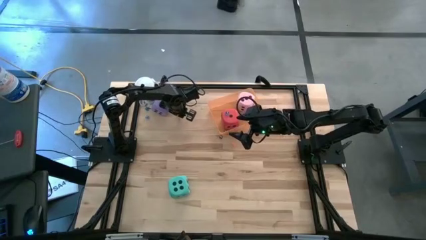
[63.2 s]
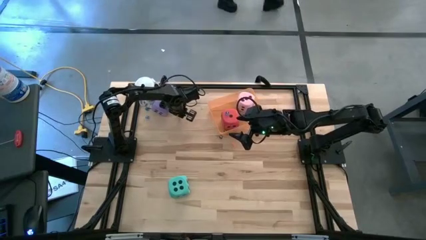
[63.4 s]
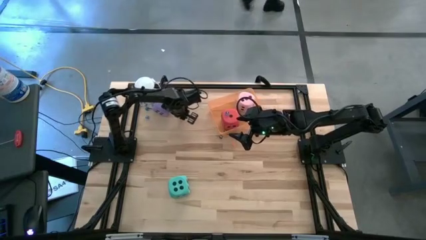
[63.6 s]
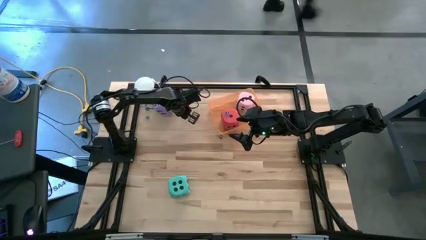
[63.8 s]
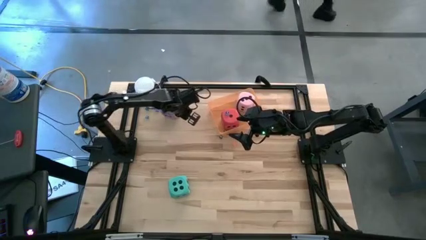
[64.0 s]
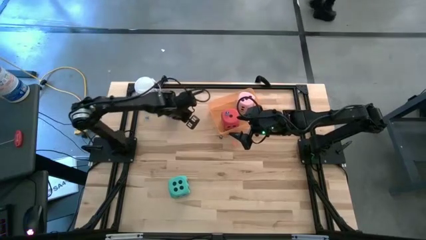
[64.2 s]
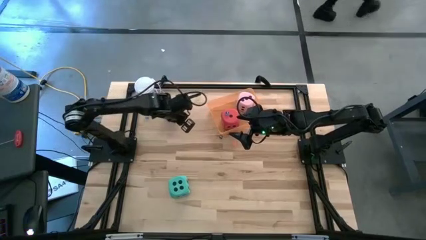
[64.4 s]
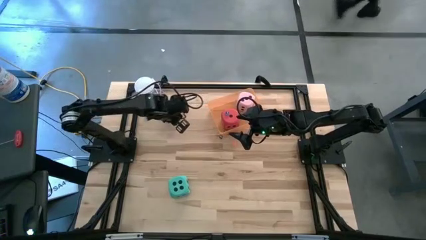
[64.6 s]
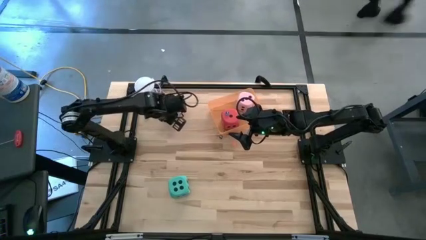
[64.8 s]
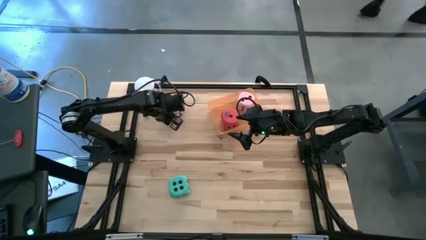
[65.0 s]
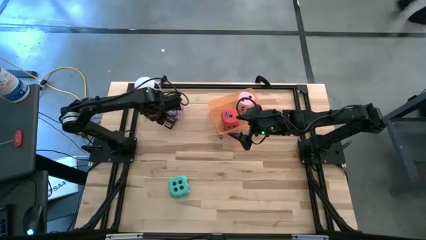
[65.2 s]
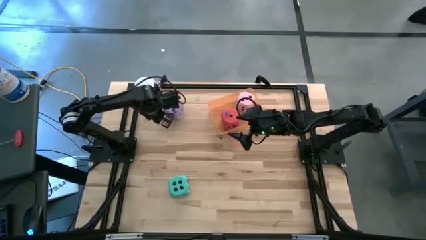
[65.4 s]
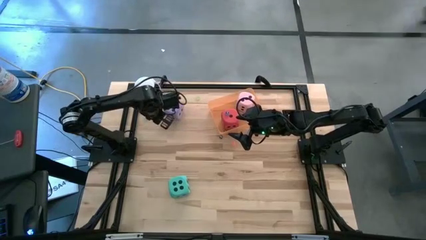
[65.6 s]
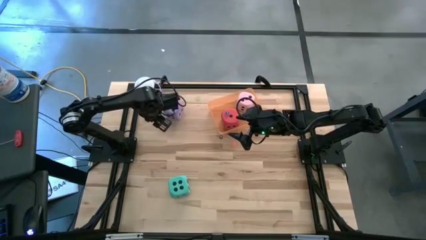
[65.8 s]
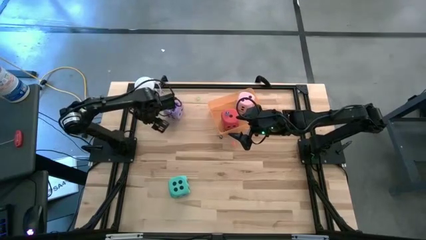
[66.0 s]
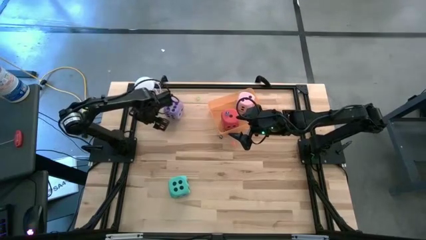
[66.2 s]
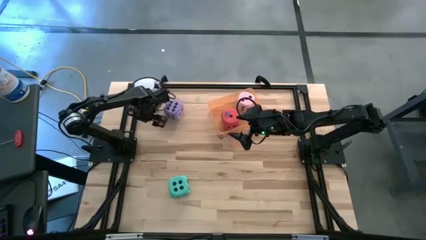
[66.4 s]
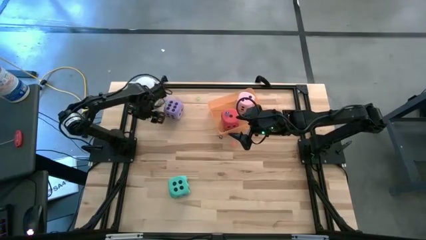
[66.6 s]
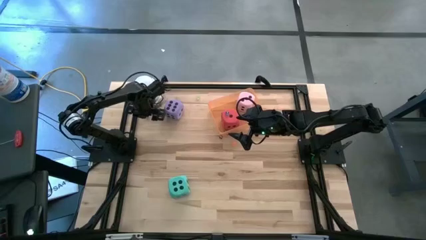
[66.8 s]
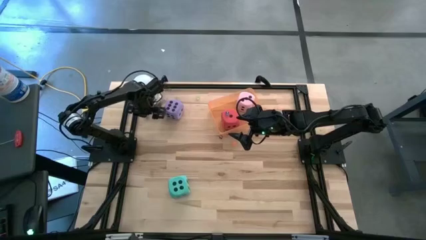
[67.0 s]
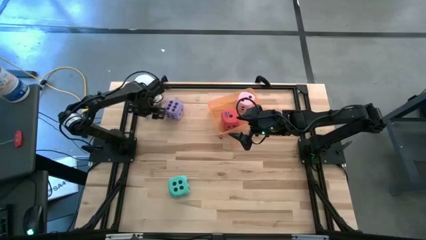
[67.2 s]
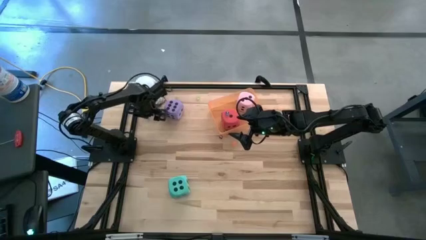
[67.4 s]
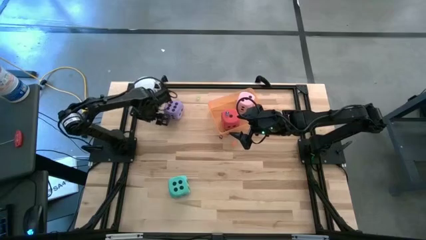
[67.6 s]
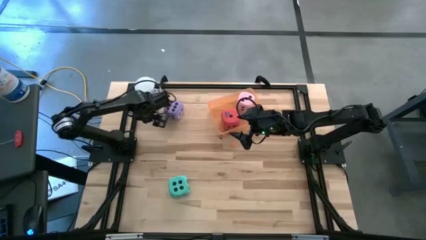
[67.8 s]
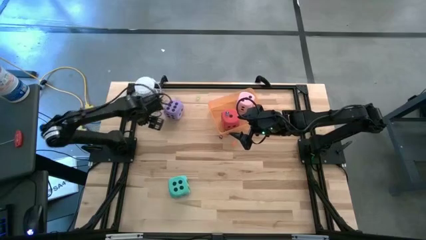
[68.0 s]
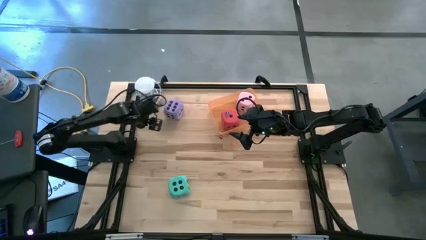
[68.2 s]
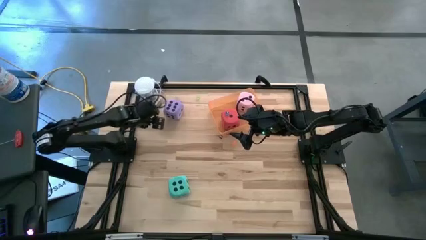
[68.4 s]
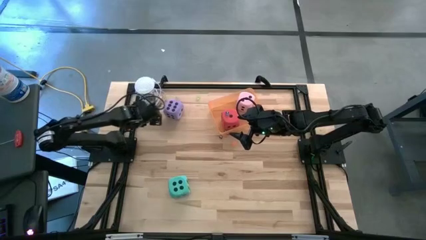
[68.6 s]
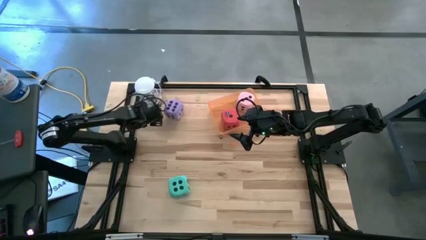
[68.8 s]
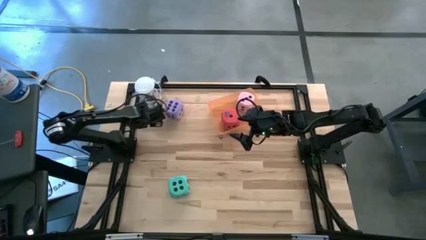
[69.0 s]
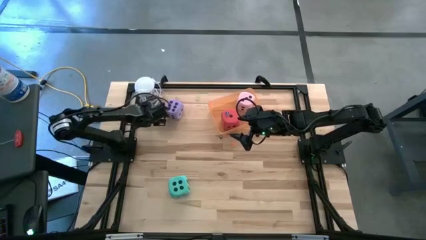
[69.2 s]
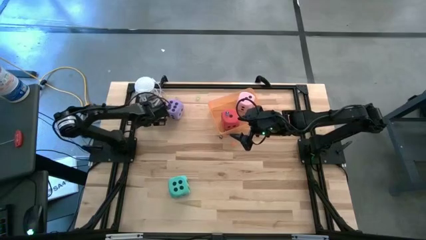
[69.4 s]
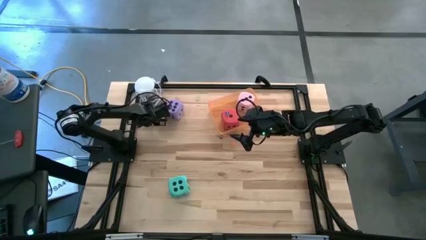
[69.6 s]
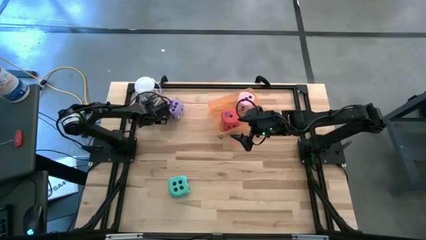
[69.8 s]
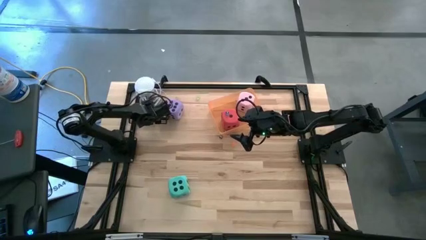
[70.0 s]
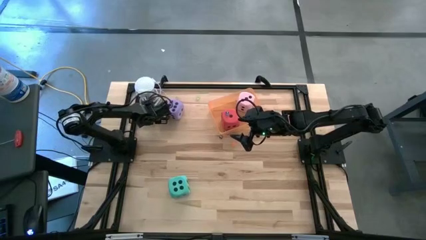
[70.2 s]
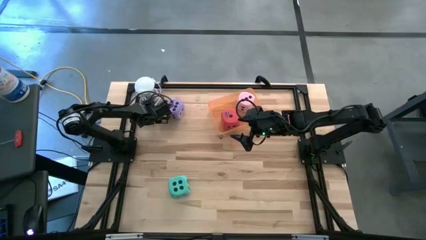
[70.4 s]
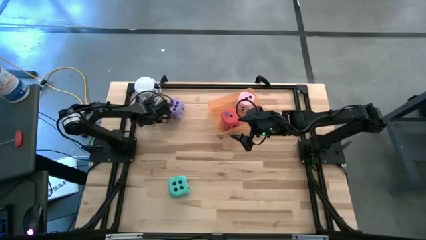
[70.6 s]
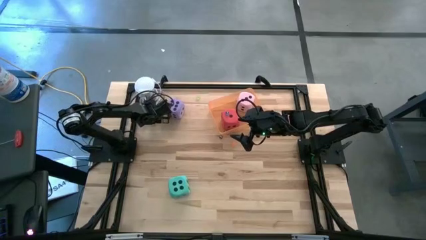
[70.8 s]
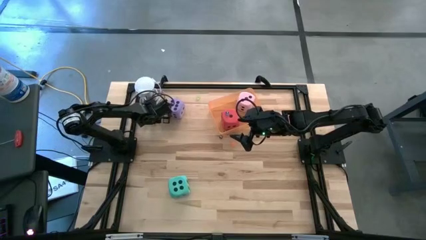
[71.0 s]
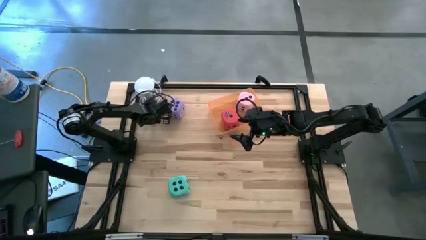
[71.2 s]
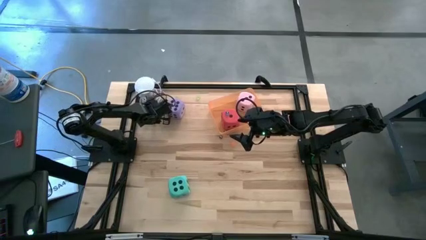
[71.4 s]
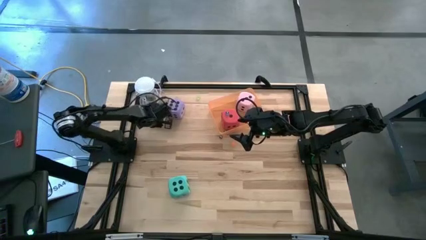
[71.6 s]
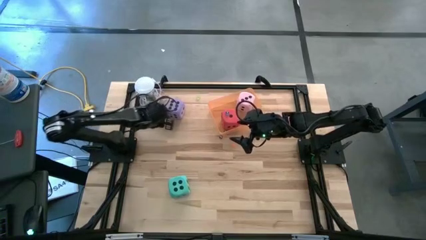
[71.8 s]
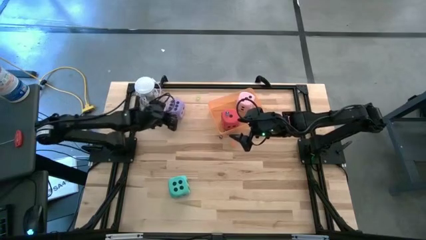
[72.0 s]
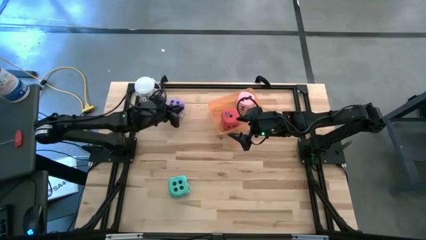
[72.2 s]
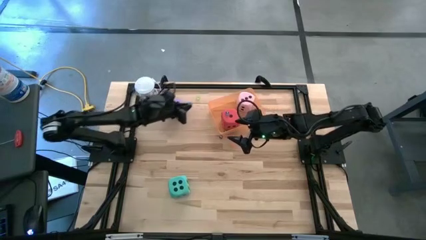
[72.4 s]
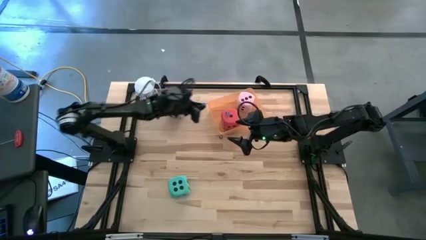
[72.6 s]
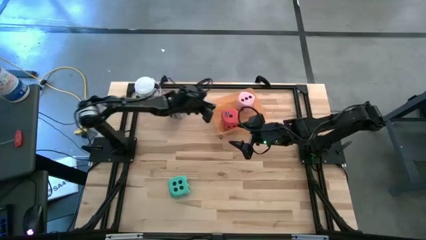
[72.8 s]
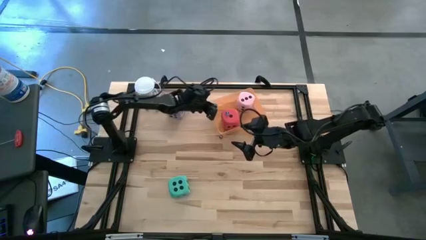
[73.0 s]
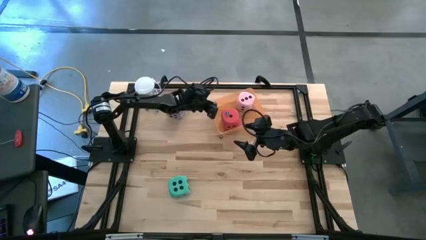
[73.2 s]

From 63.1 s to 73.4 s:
Task: Pick & Place Dice
Put the small blue dice into the orange bin

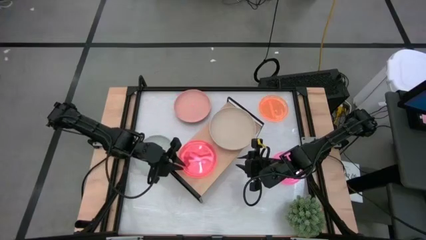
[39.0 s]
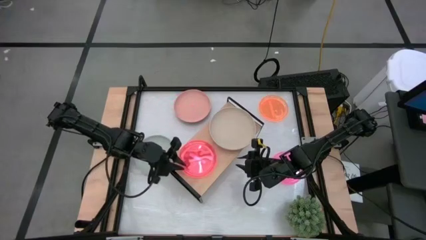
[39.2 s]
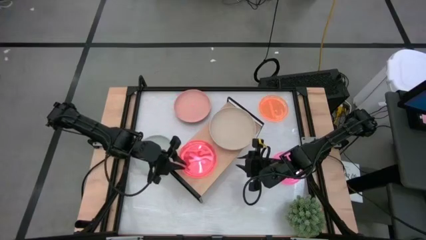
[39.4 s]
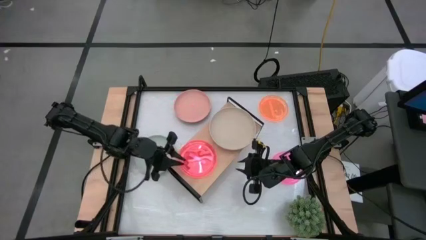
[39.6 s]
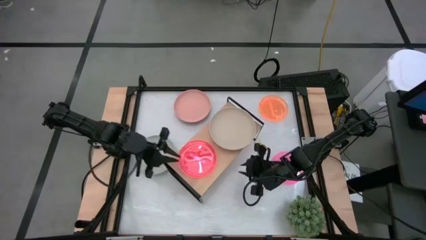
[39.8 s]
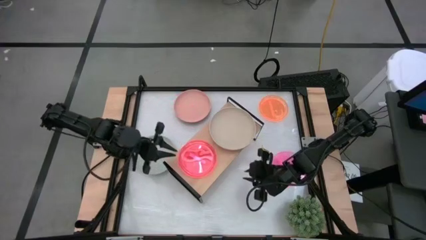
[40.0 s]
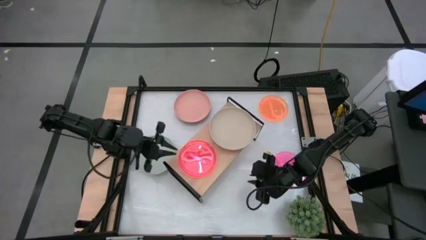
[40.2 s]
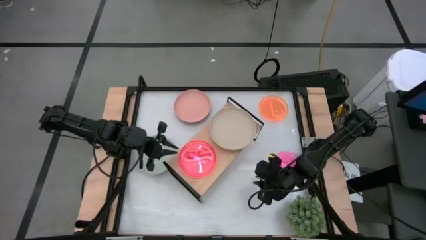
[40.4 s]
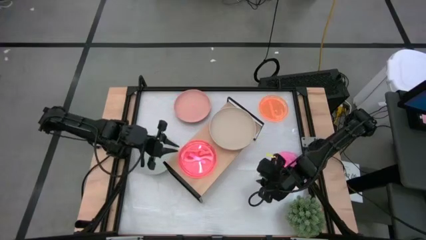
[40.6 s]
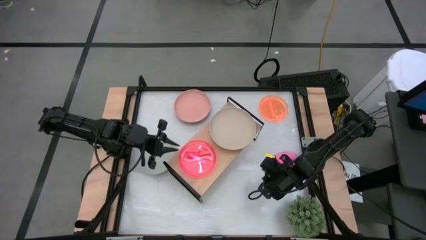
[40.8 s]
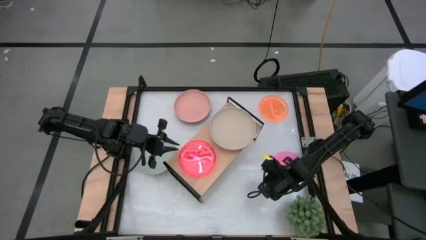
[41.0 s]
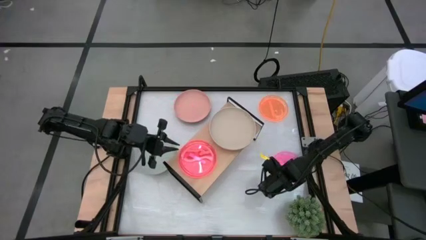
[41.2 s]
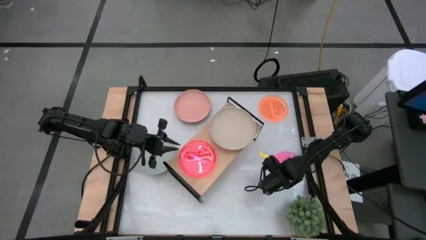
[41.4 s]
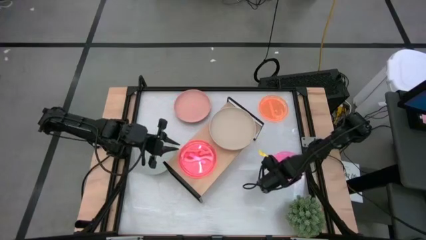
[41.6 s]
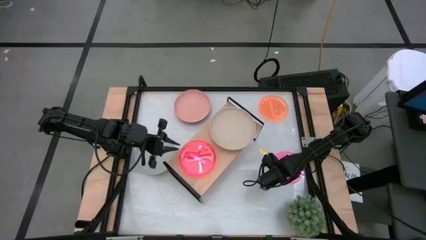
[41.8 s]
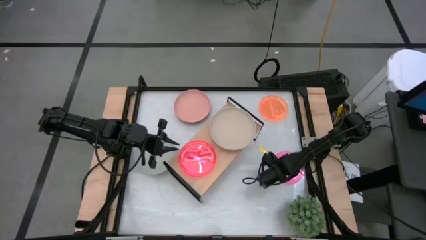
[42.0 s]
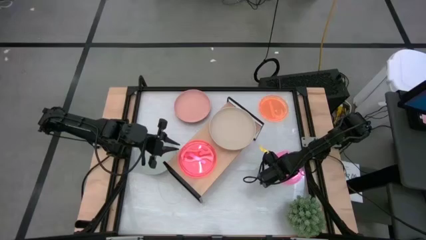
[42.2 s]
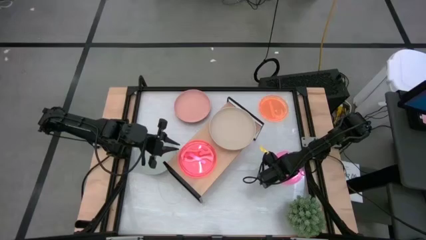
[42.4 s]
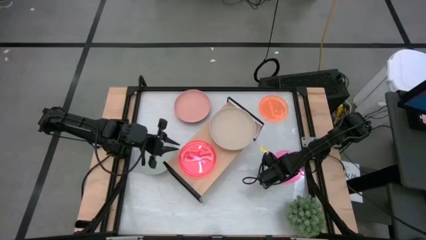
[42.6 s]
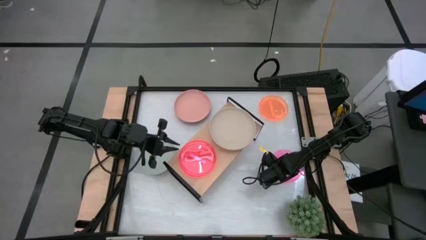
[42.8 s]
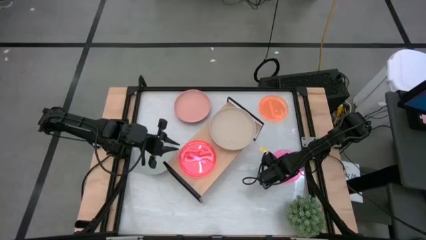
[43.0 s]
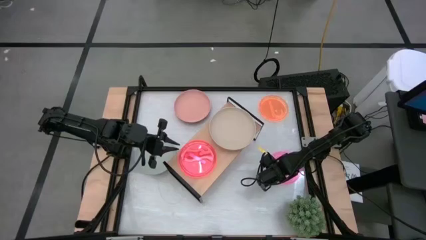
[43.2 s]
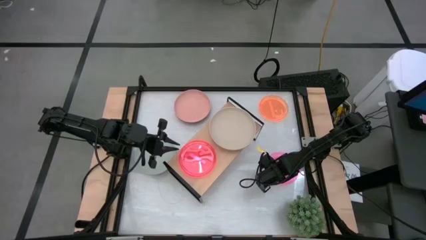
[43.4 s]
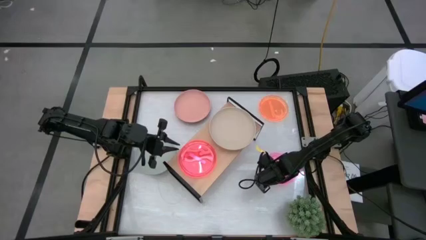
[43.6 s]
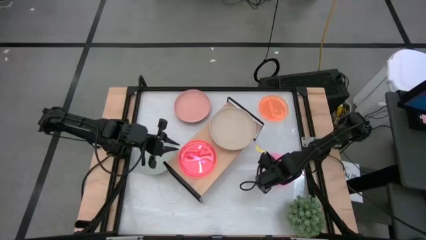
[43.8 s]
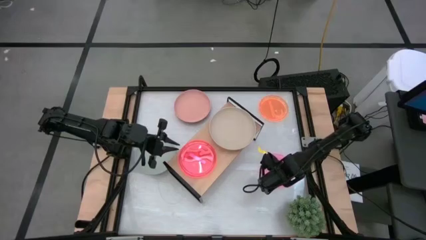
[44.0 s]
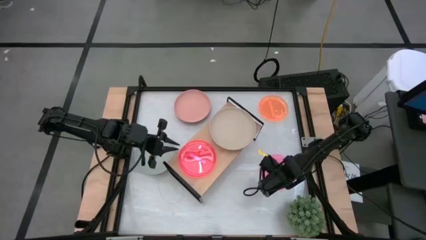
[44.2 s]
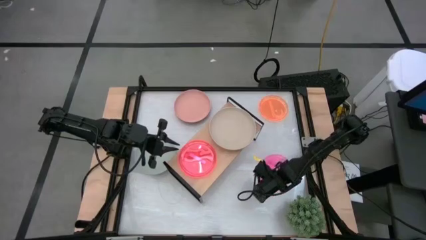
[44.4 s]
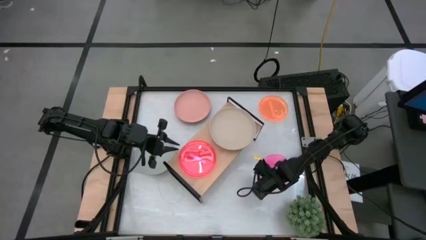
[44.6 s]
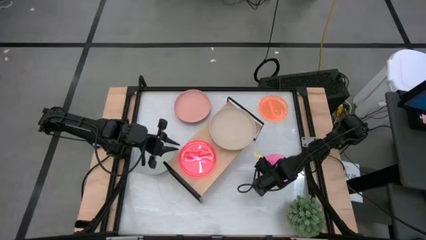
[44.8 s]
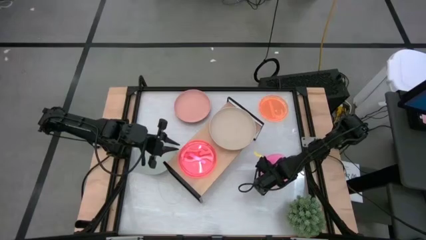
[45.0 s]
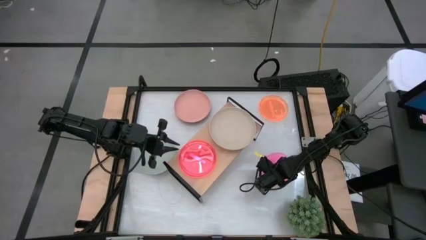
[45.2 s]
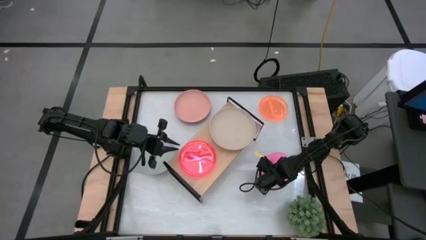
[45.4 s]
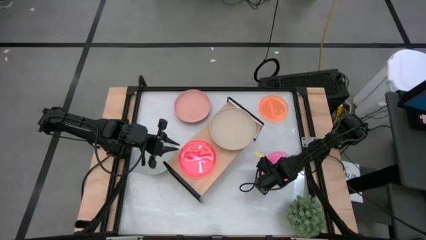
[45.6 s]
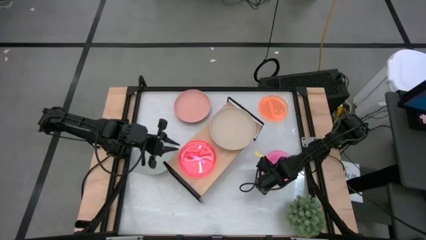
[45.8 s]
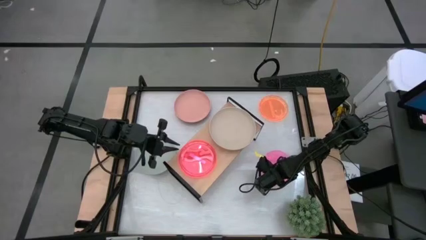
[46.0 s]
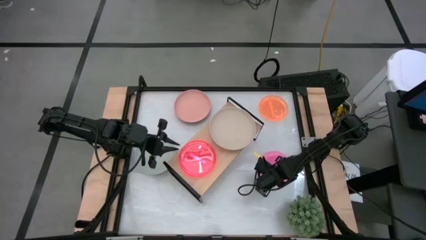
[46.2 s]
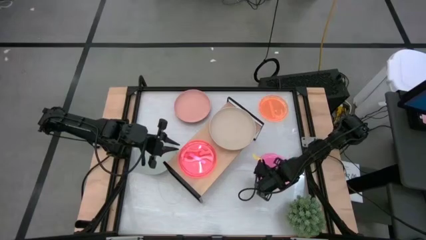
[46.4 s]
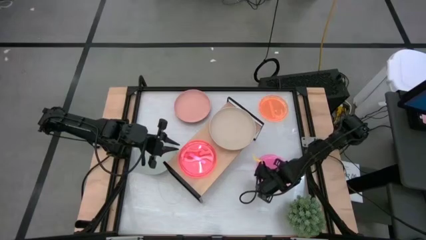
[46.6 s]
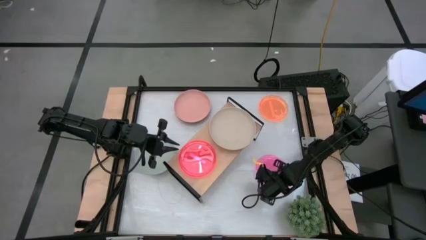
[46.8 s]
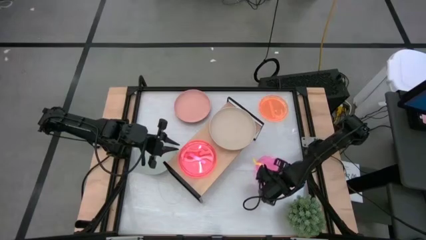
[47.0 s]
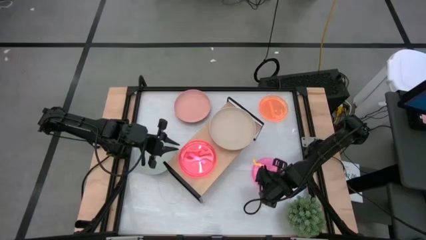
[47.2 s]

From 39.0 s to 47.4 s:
Task: Place and stack plates onto a shelf
Stack the small pink plate on top of the small pink plate on the shelf
